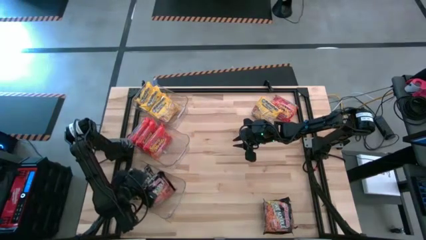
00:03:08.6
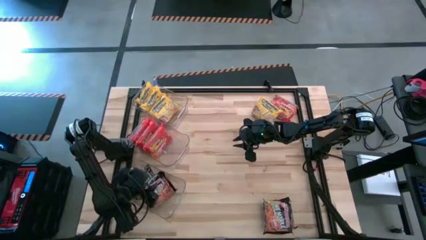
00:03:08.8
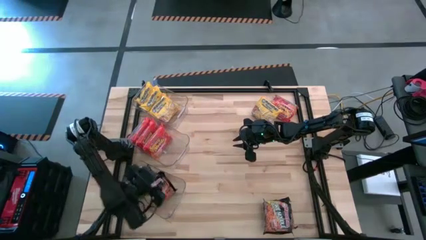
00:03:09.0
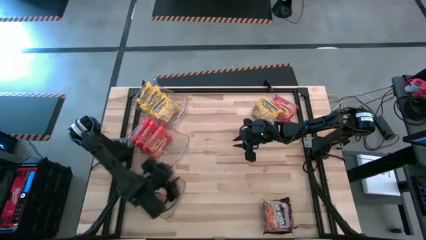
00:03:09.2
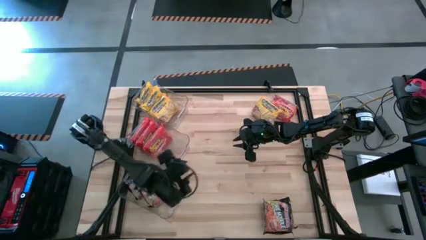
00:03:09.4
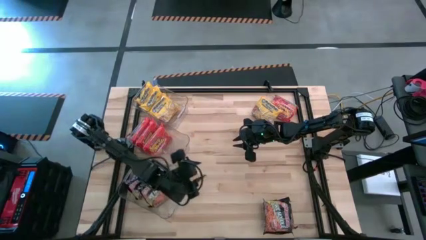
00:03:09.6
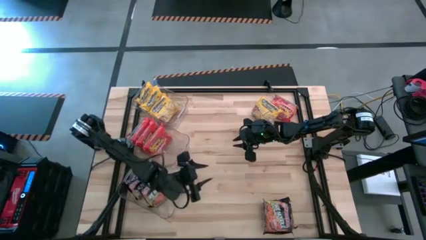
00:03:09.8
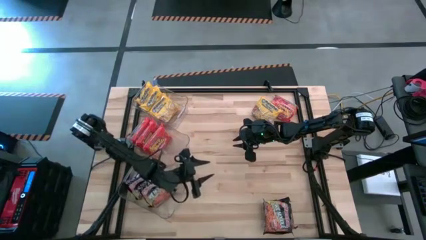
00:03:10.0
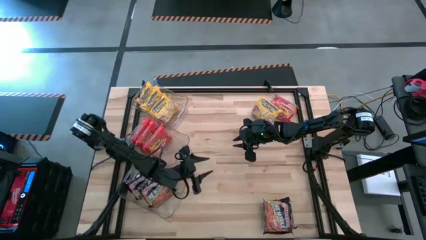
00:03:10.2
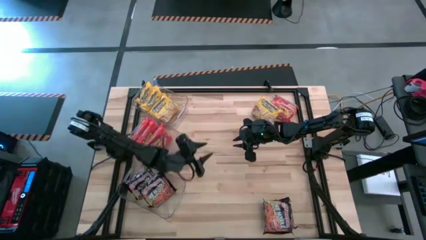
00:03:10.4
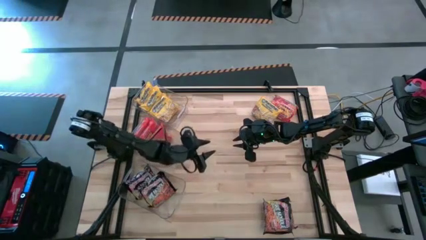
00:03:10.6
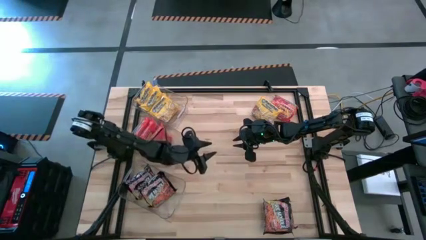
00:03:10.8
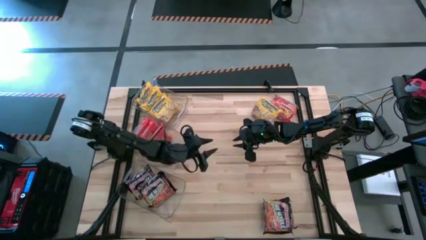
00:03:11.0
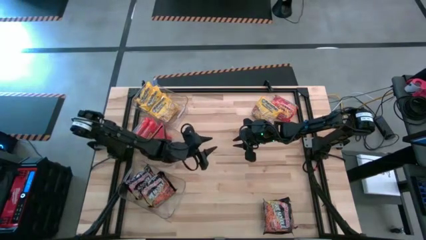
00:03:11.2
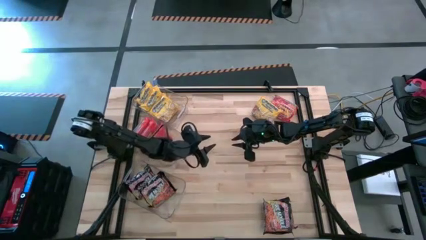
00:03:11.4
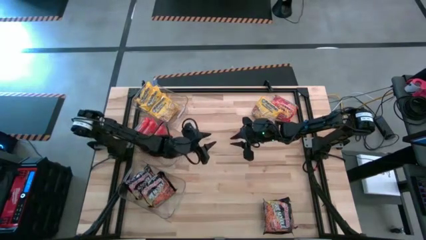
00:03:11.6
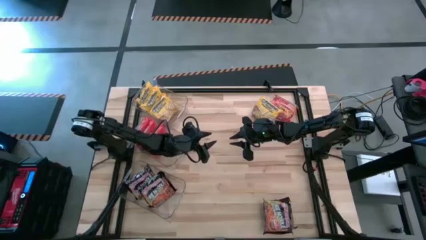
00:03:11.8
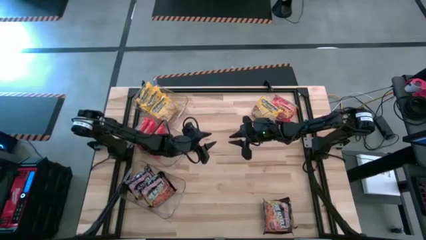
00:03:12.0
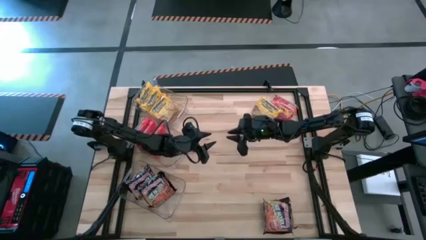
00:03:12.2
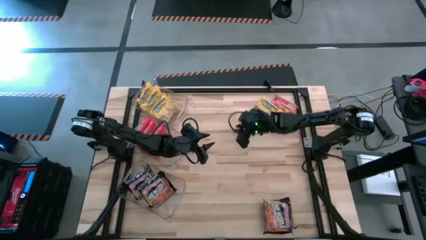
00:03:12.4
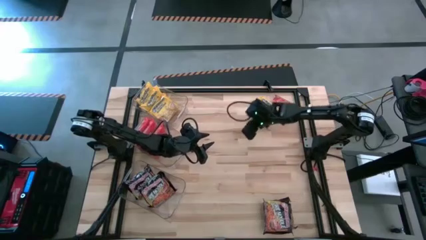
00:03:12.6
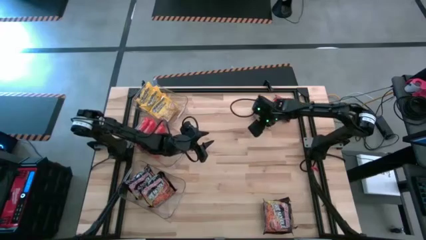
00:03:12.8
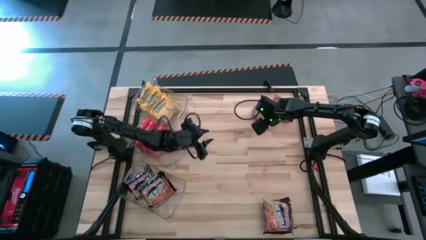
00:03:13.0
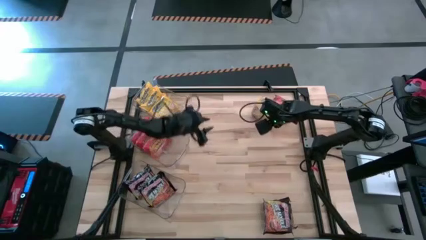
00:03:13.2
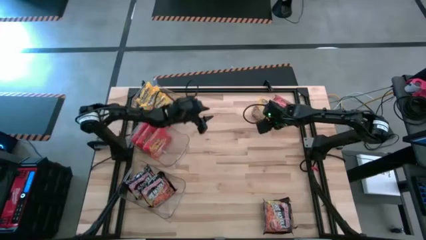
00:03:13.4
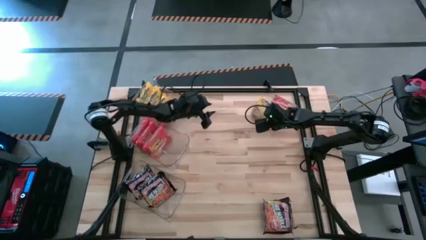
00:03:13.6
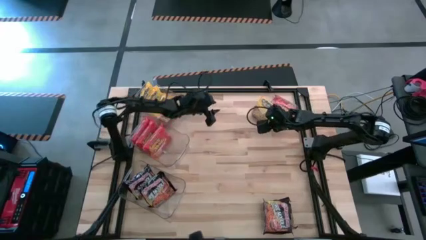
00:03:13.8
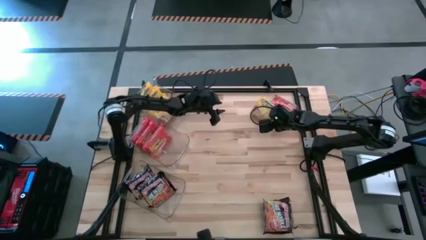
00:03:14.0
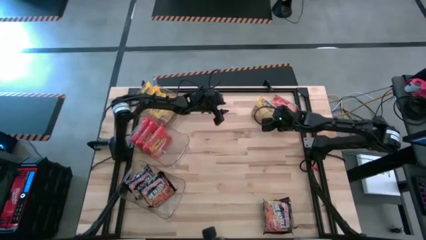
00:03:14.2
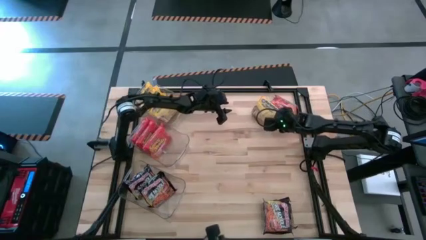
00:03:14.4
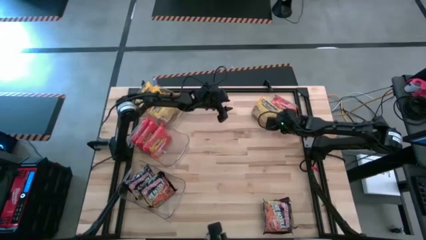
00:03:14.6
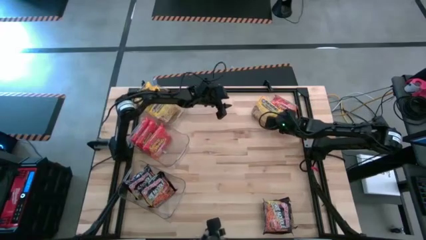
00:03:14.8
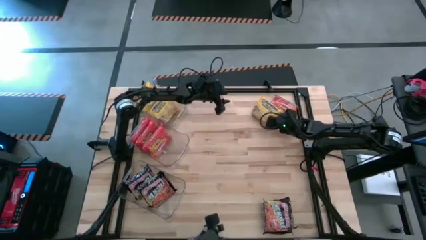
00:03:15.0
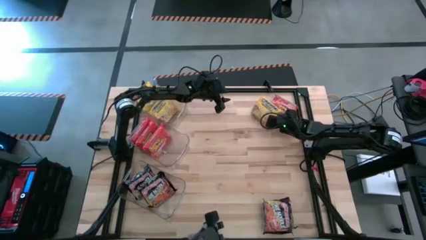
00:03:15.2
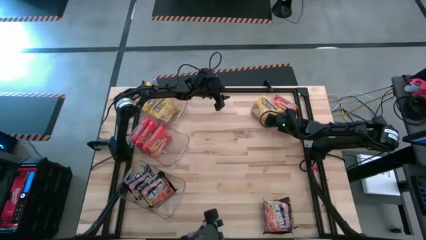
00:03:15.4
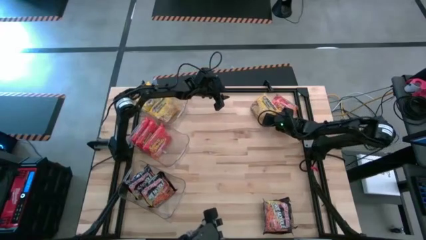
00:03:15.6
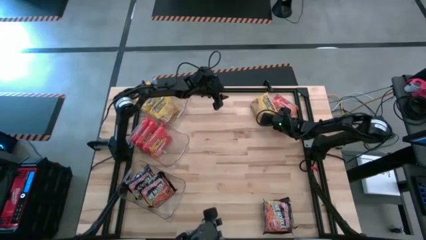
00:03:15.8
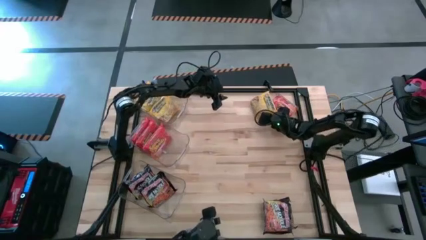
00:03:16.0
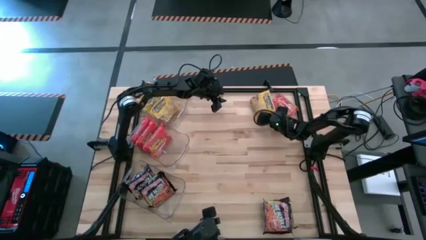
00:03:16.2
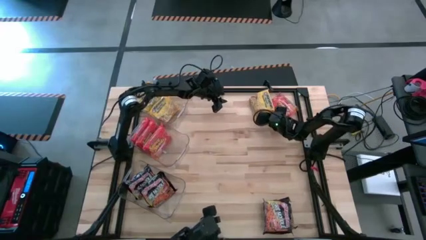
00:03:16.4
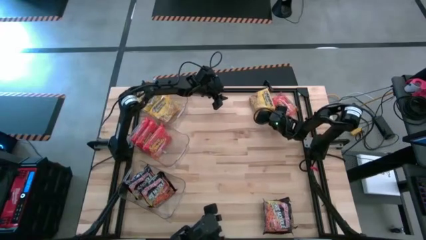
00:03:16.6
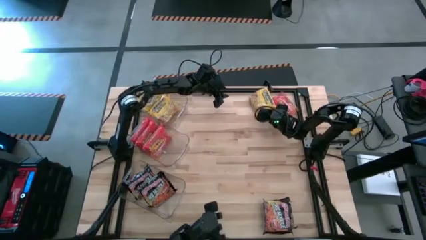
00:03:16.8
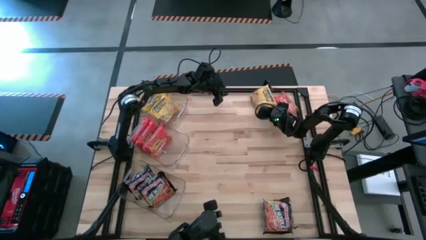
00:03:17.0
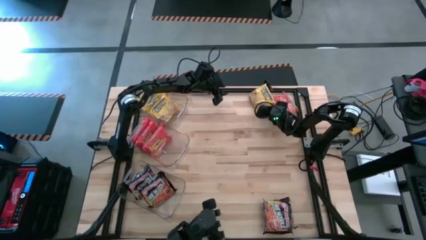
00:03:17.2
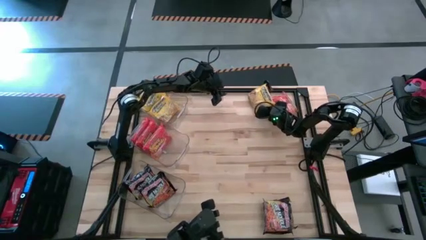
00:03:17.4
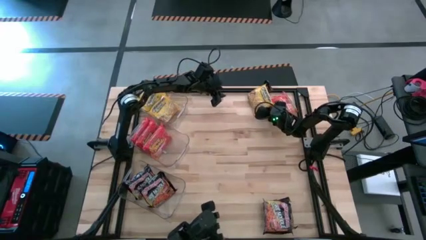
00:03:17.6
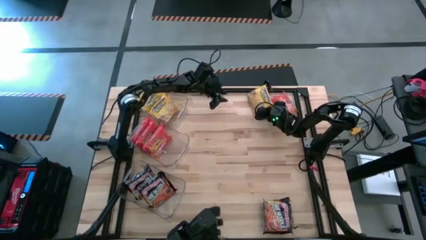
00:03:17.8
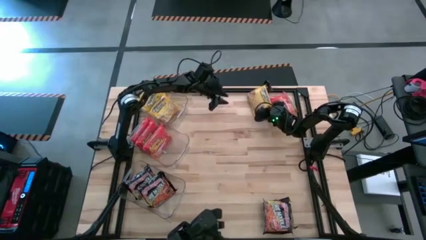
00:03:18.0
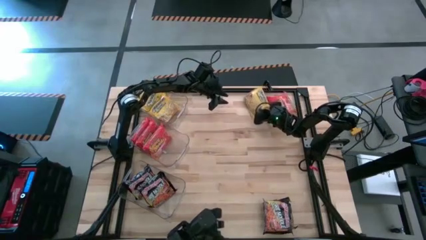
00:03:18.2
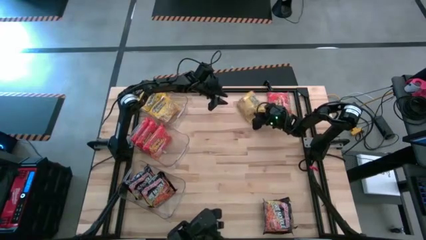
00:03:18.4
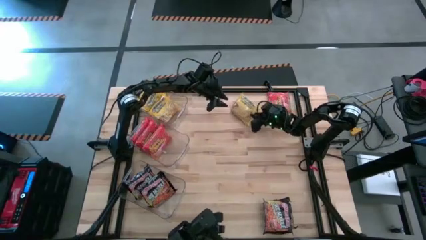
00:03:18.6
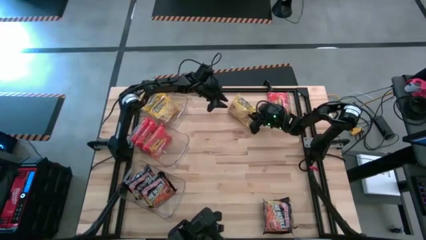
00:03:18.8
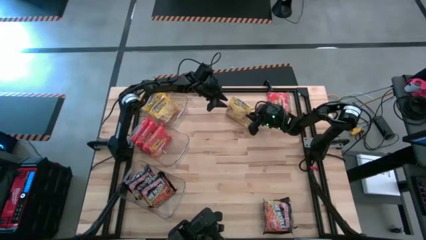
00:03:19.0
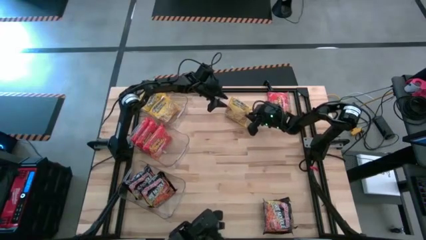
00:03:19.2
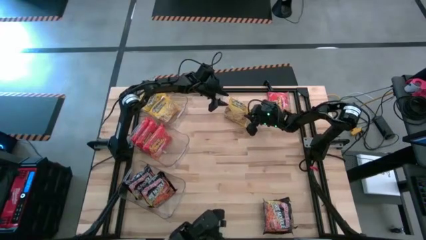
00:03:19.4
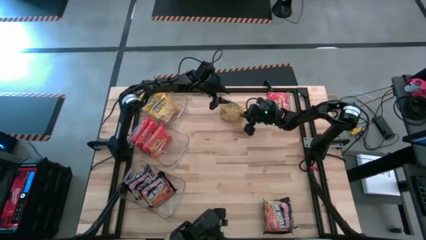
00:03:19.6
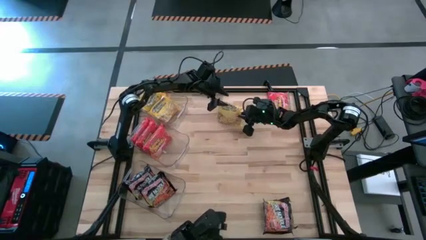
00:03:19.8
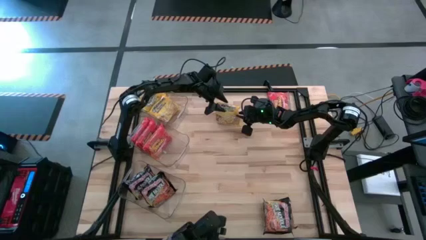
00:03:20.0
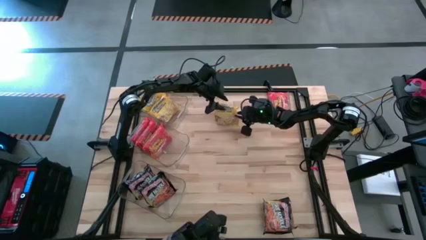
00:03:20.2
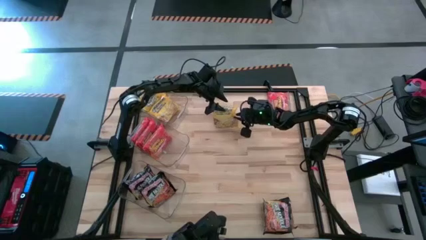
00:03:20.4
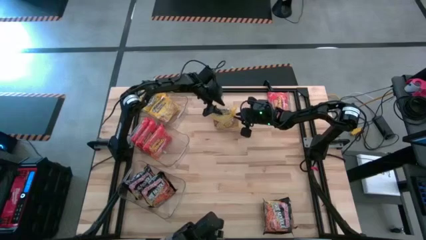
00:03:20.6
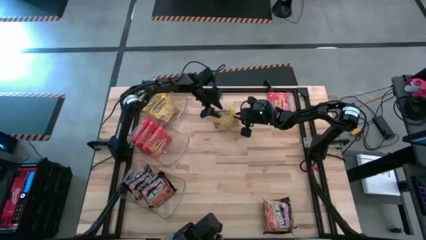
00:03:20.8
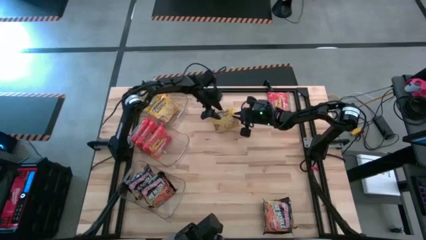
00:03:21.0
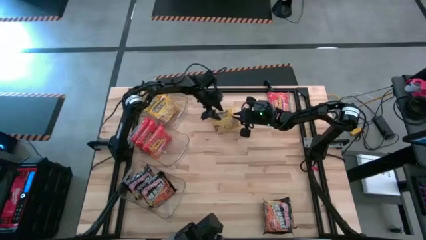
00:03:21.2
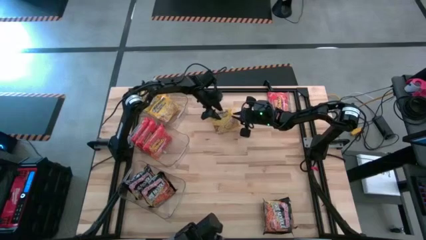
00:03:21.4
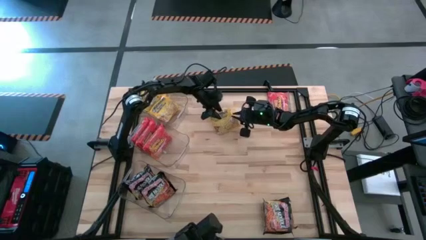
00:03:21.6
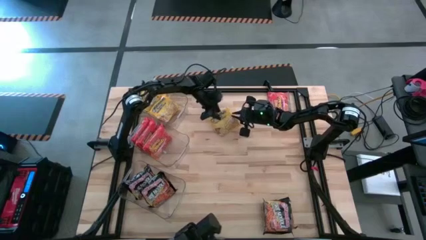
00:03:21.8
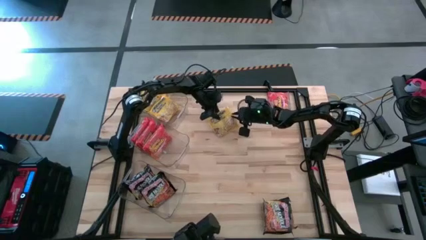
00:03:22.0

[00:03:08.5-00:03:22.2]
Task: Sort Maruchan noodles
Put the yellow noodles pack into the top transparent bin
